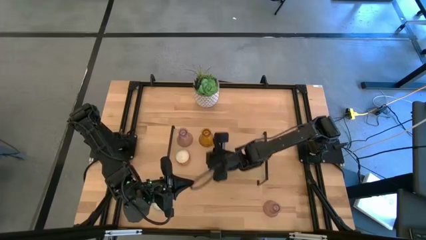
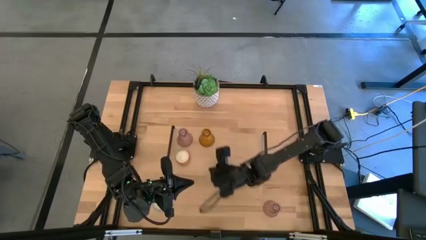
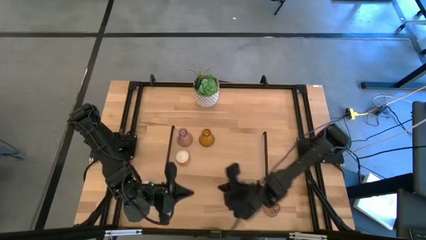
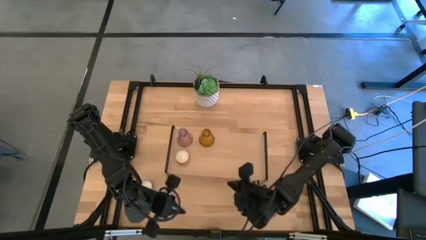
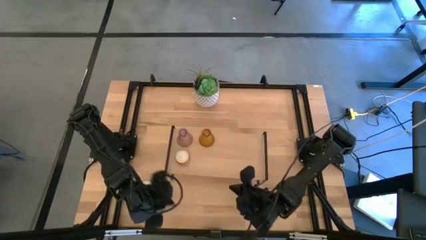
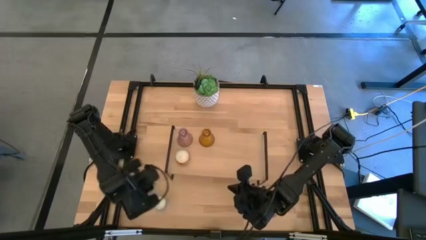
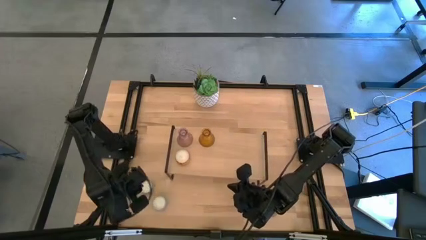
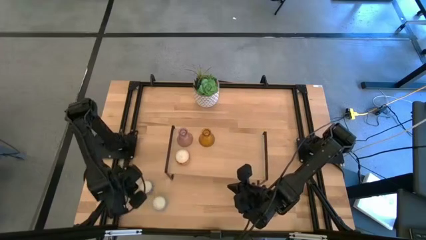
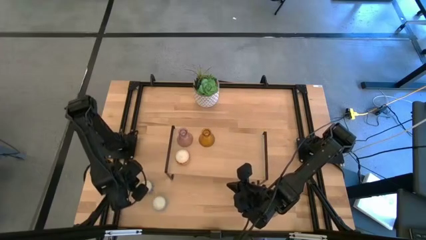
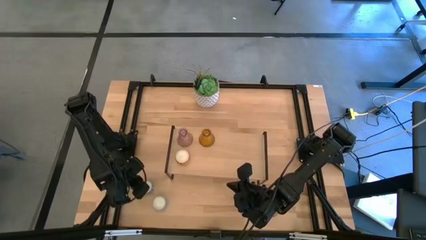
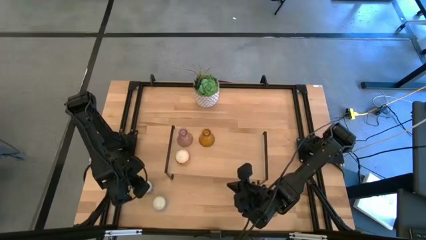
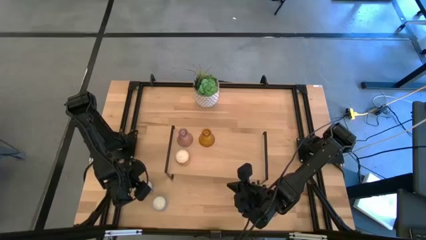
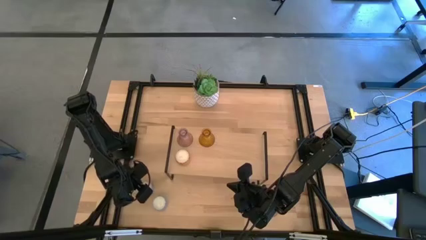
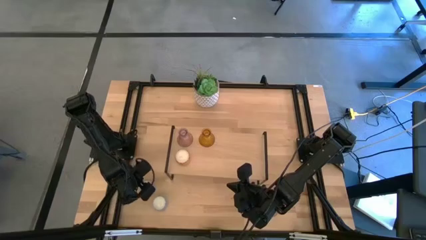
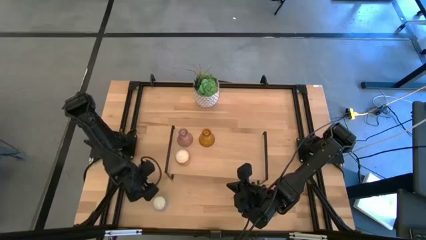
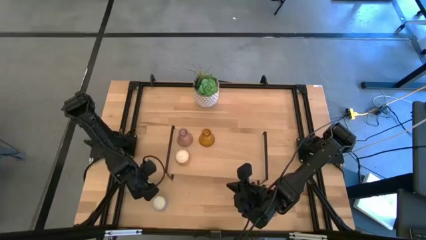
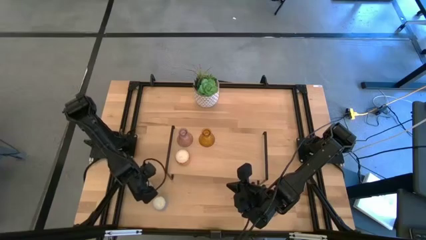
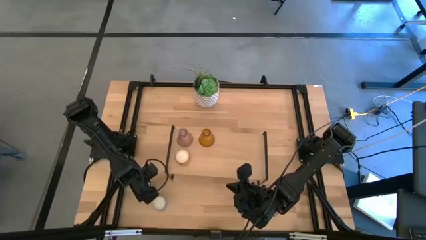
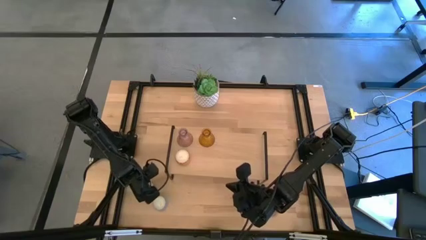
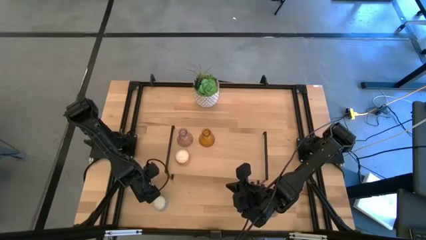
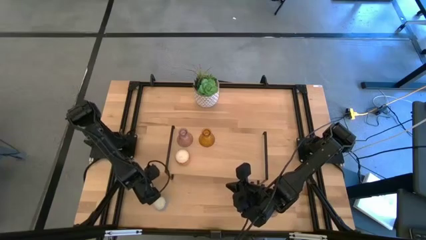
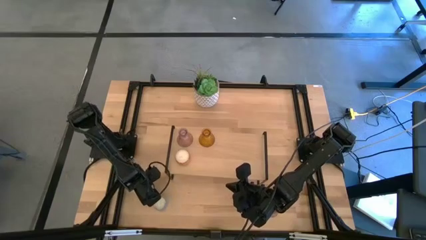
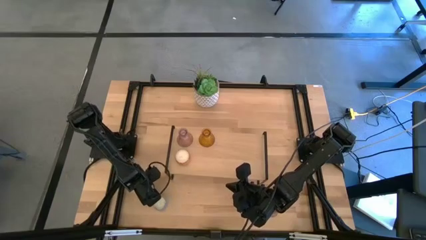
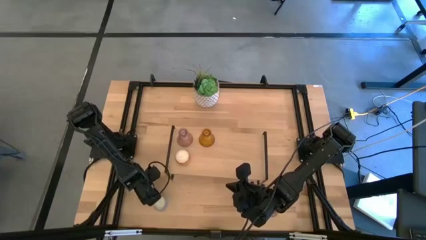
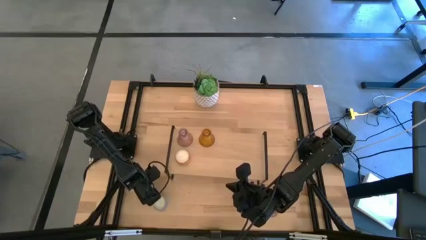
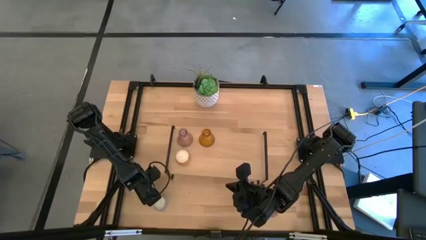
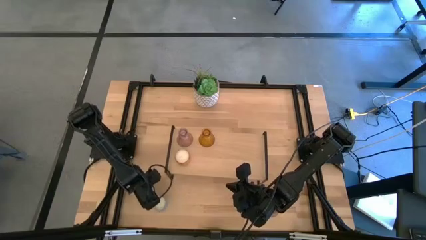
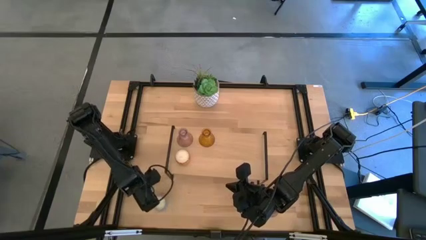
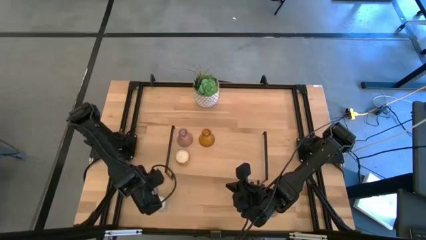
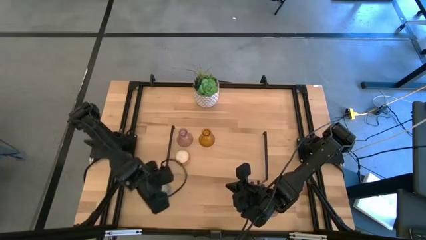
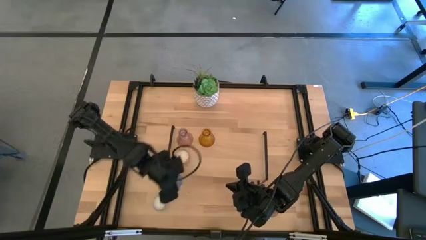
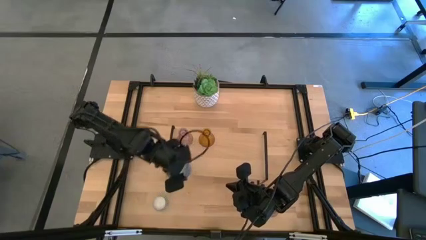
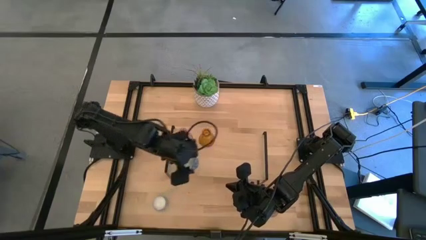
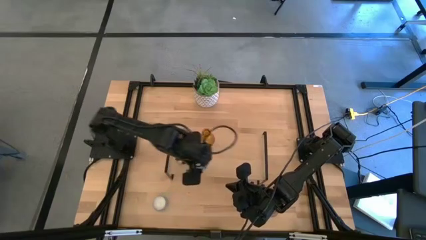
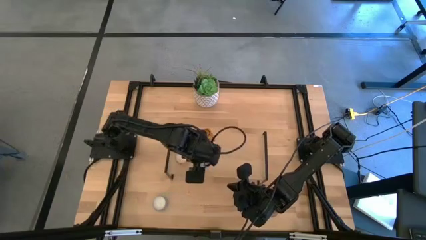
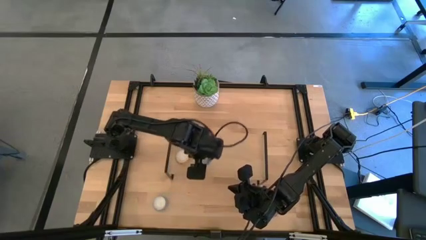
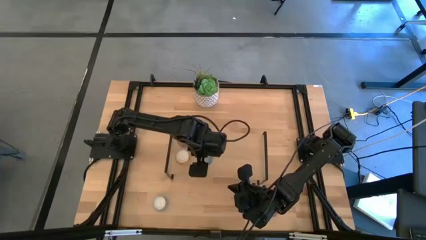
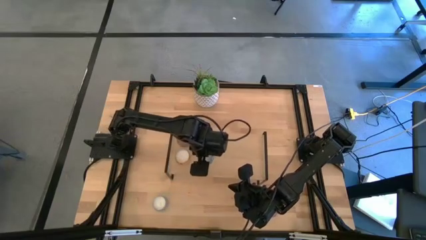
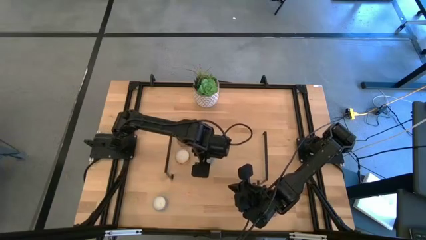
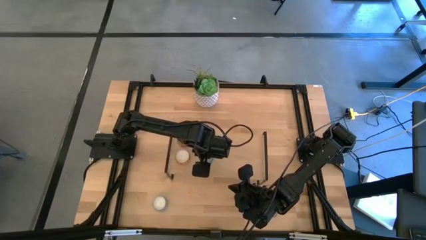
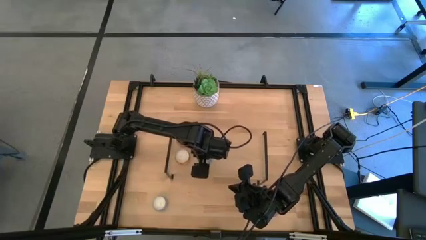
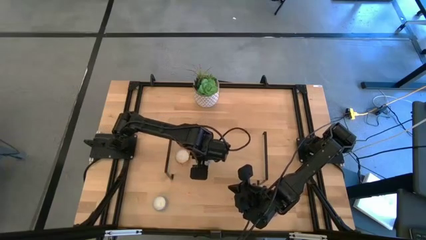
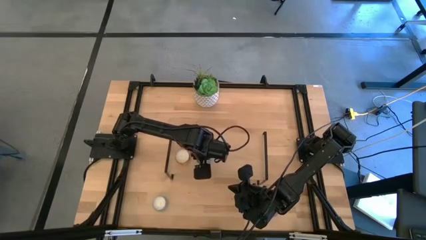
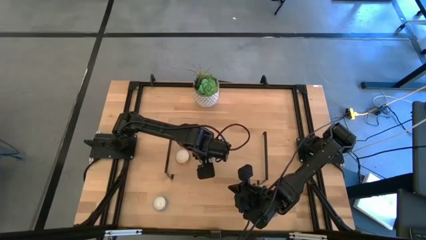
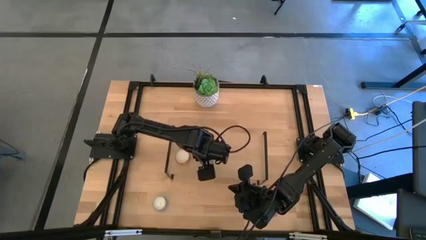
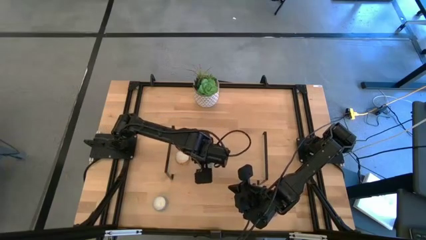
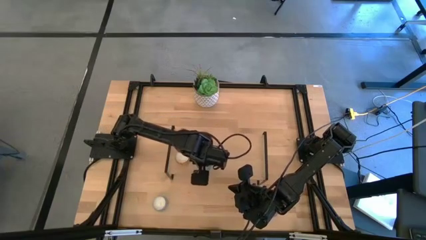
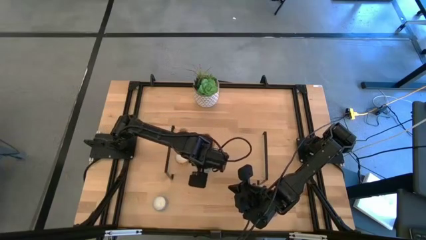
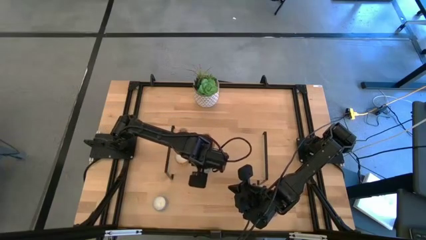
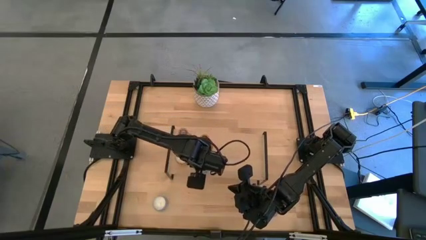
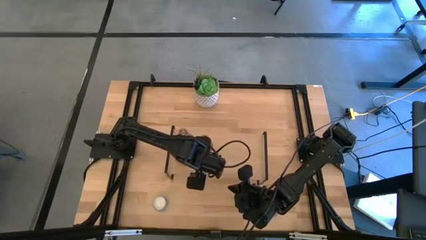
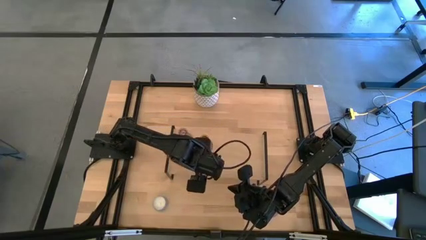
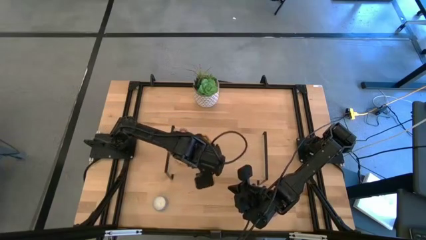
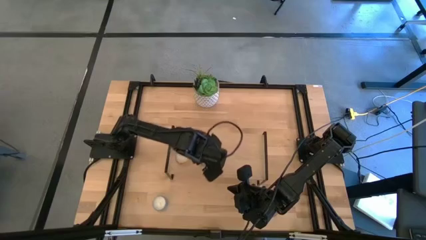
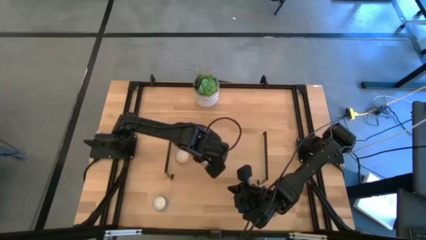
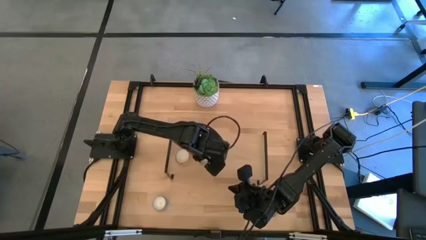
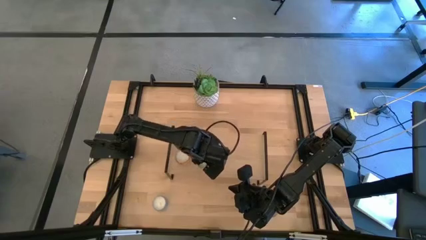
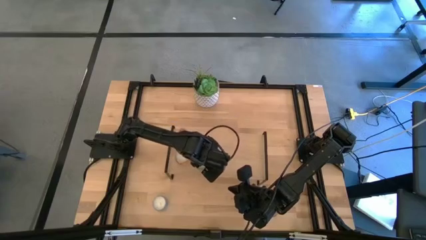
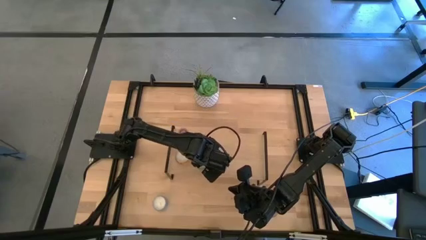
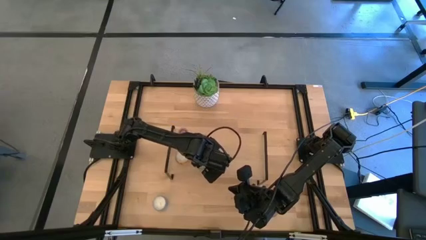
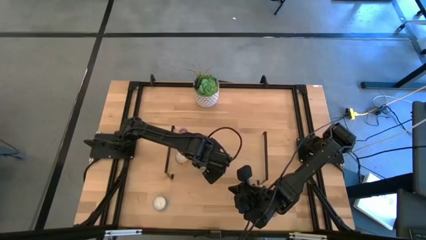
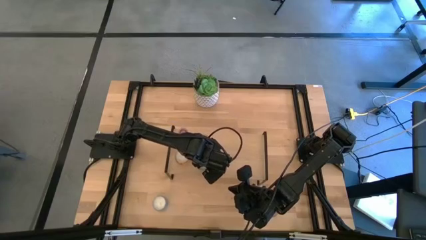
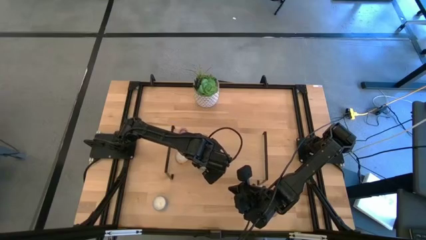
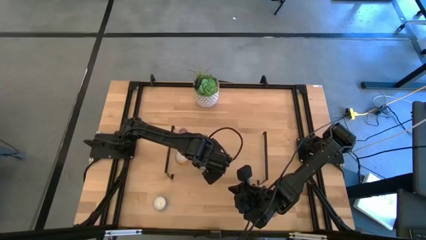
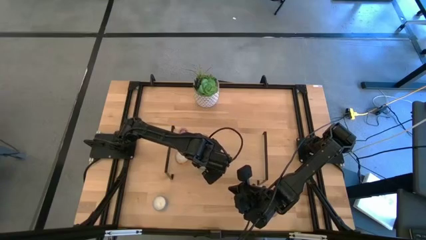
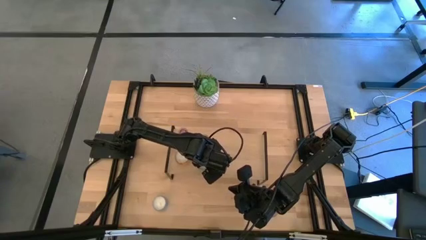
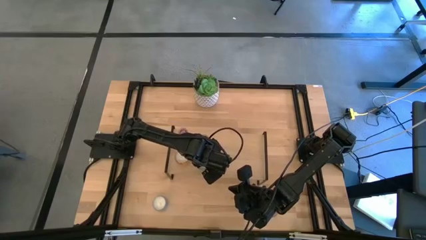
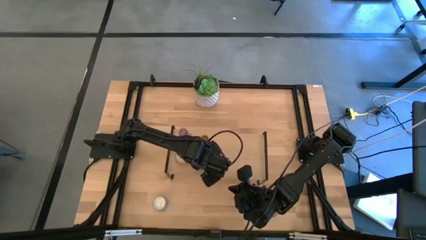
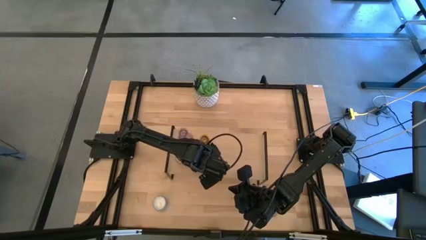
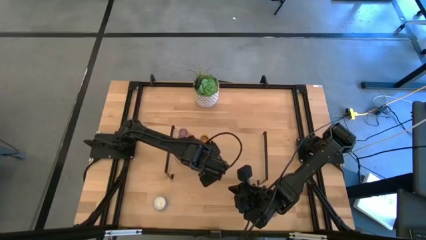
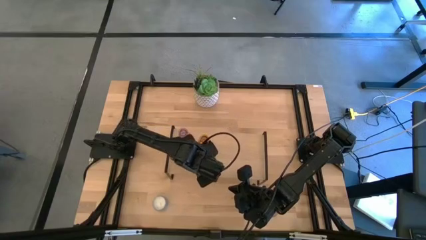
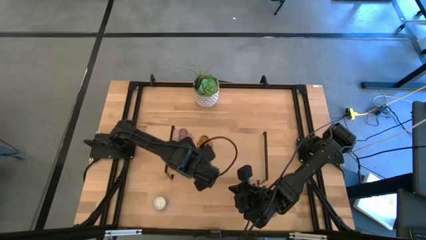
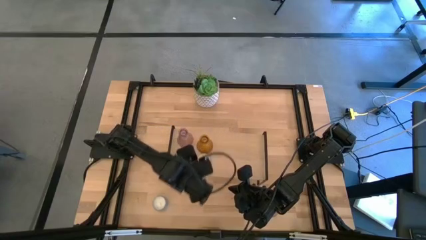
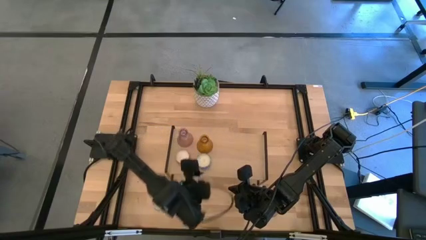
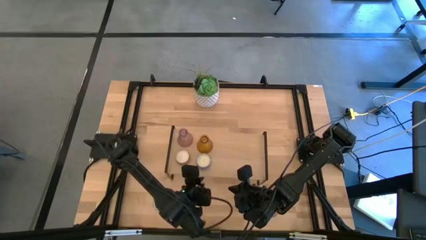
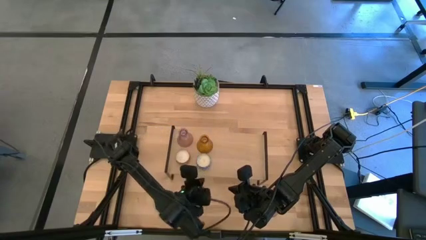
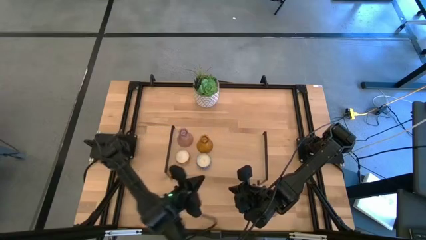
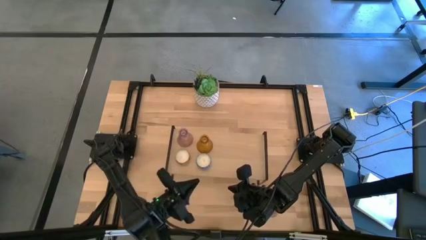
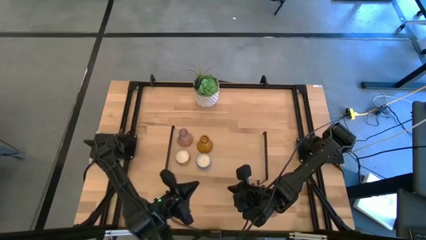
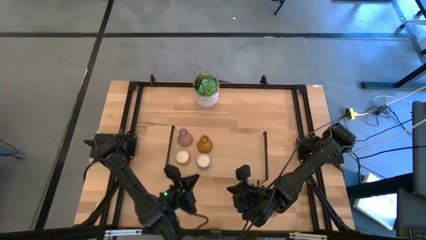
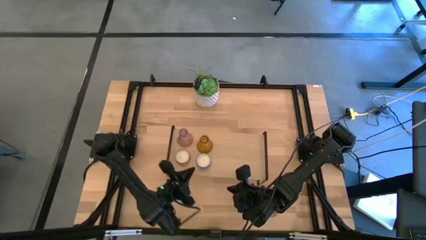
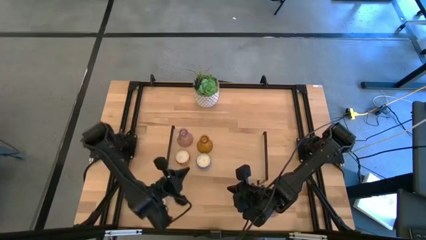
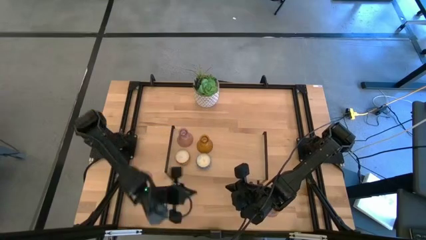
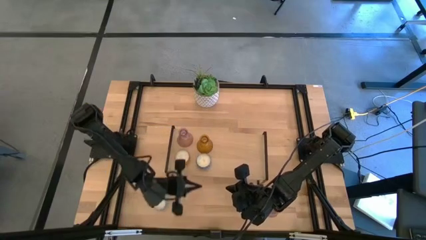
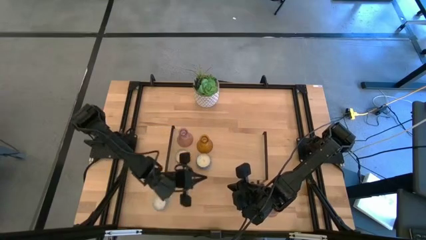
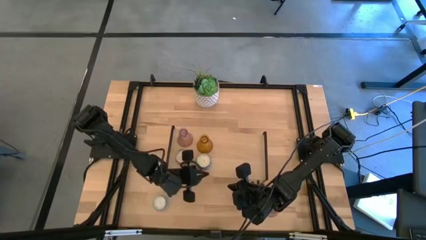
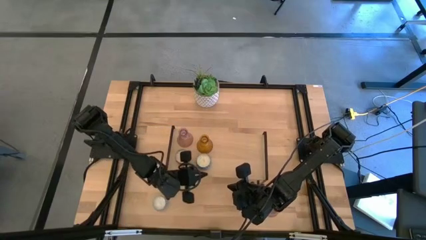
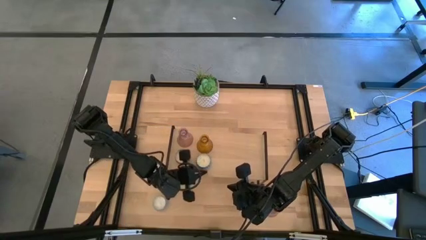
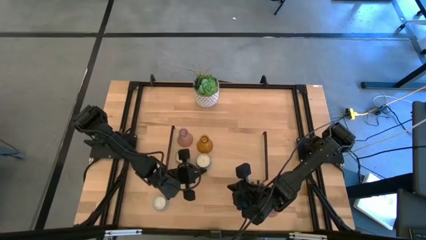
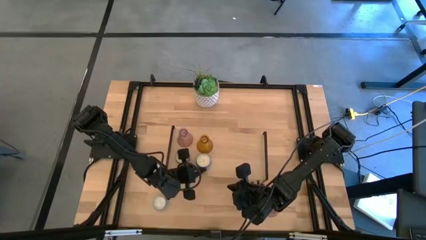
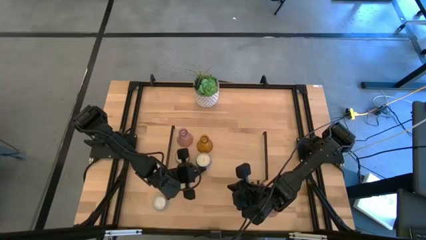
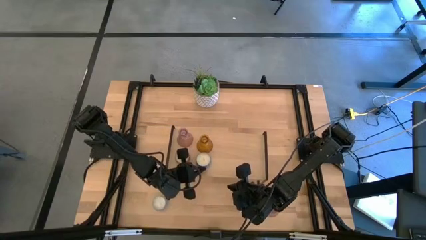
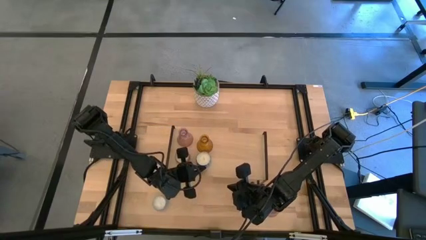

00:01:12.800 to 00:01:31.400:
Task: Pick & Place candle stick holders
Put the top blue scented candle on the shelf
